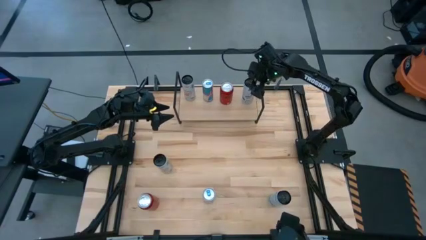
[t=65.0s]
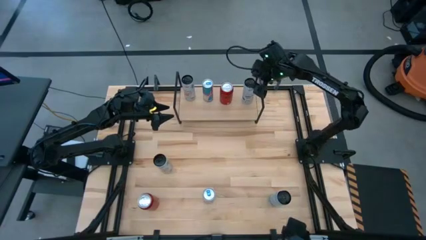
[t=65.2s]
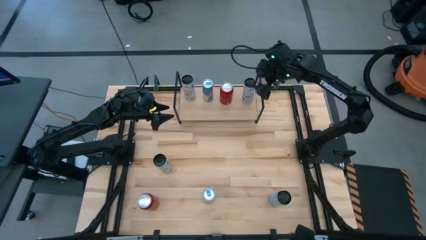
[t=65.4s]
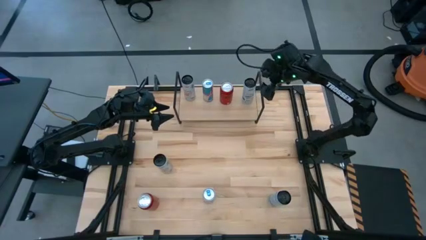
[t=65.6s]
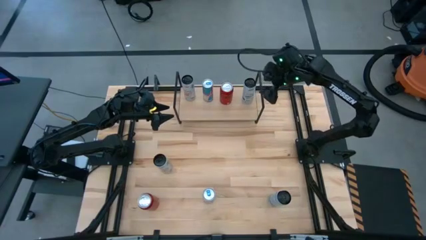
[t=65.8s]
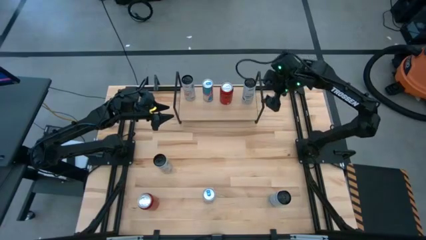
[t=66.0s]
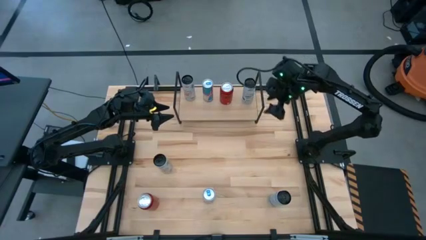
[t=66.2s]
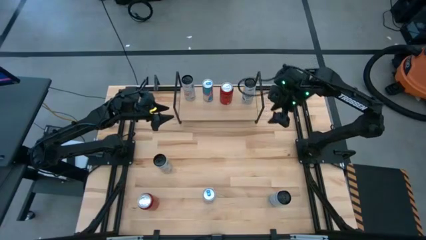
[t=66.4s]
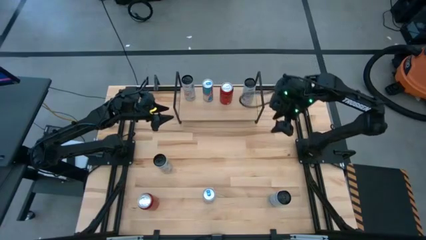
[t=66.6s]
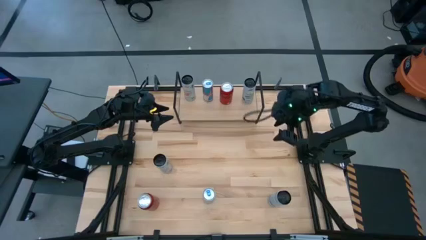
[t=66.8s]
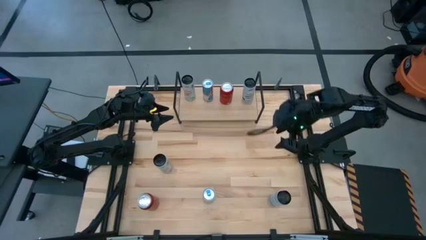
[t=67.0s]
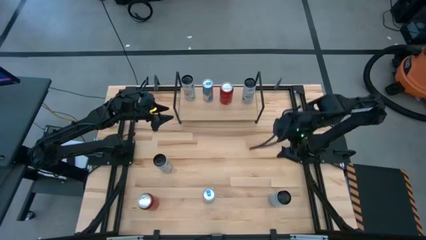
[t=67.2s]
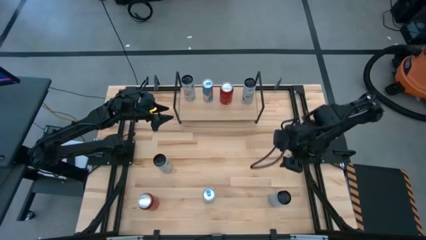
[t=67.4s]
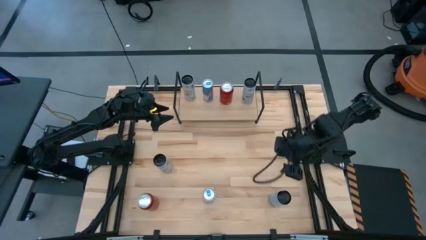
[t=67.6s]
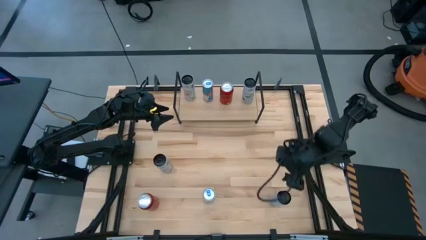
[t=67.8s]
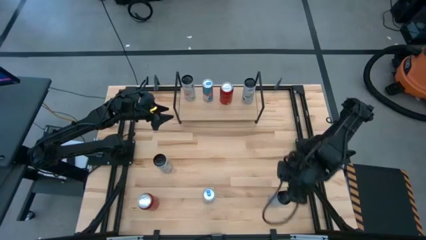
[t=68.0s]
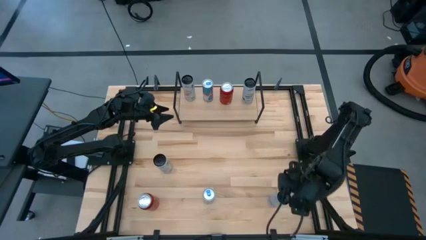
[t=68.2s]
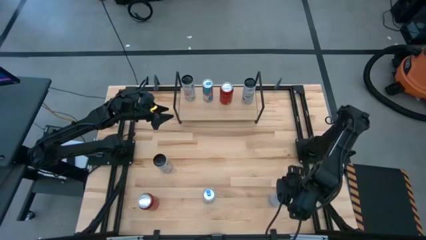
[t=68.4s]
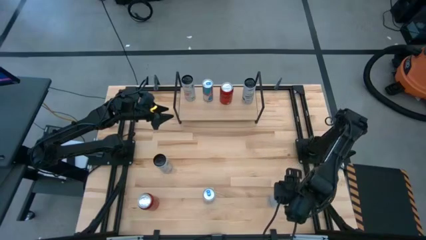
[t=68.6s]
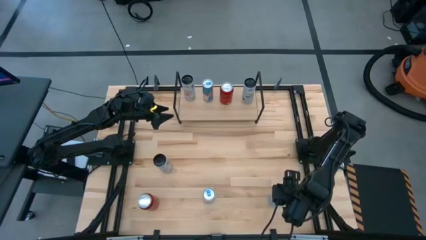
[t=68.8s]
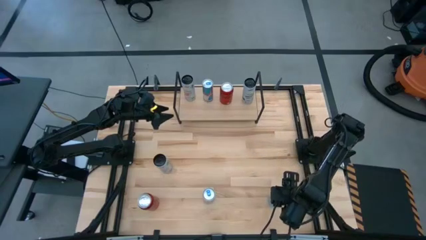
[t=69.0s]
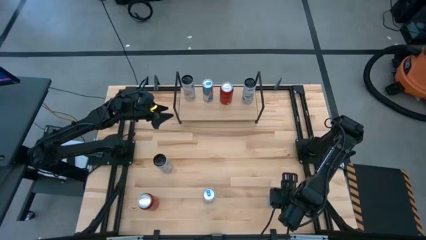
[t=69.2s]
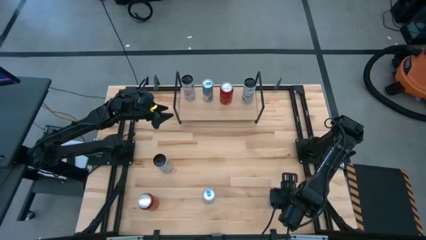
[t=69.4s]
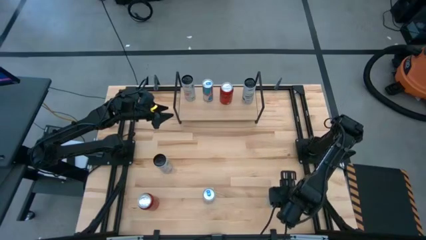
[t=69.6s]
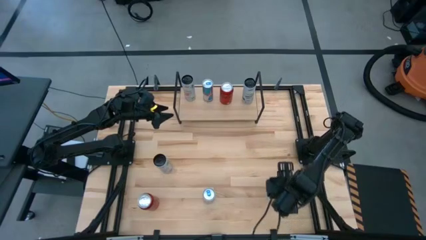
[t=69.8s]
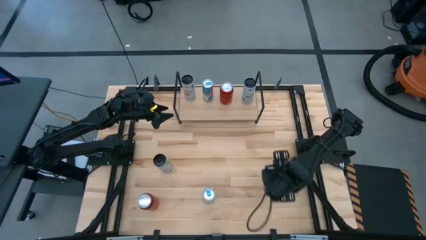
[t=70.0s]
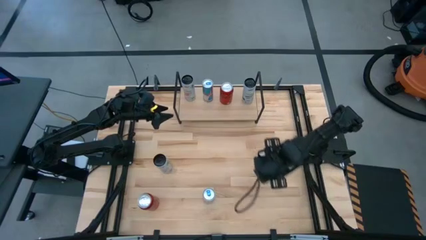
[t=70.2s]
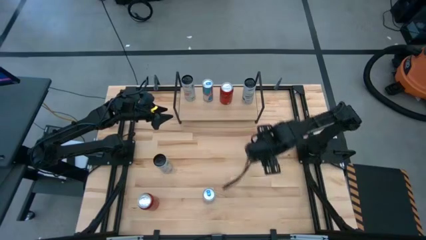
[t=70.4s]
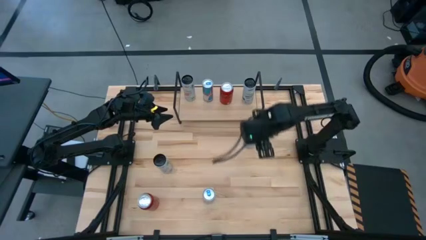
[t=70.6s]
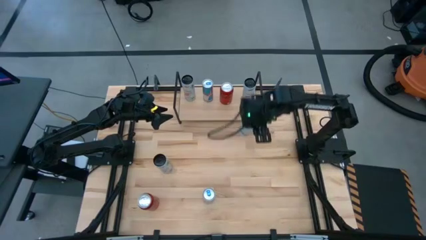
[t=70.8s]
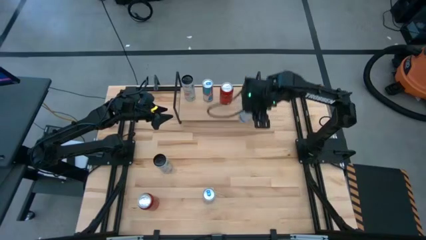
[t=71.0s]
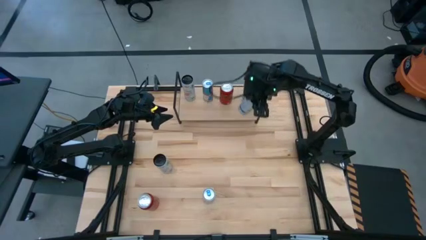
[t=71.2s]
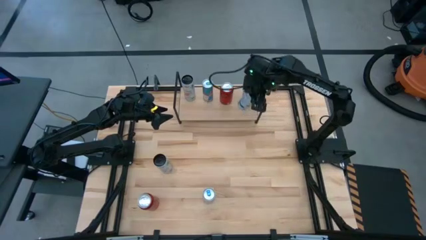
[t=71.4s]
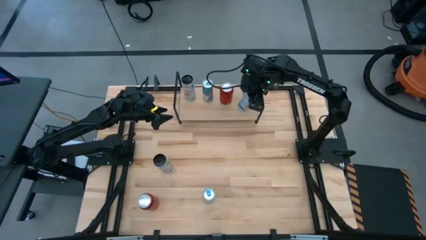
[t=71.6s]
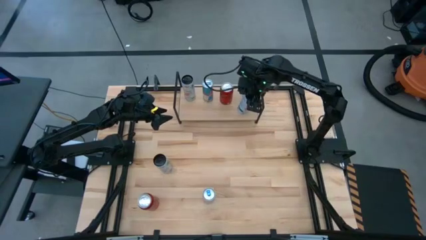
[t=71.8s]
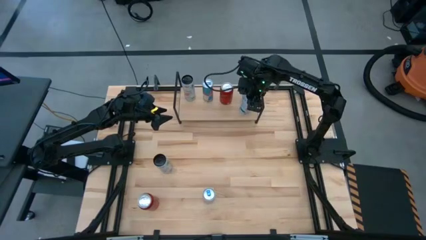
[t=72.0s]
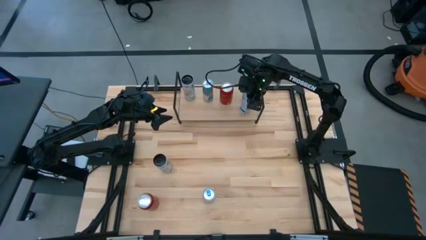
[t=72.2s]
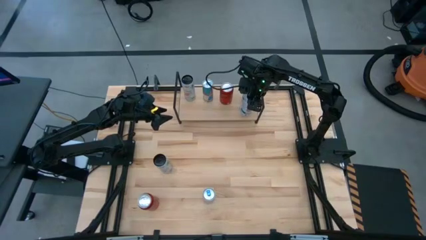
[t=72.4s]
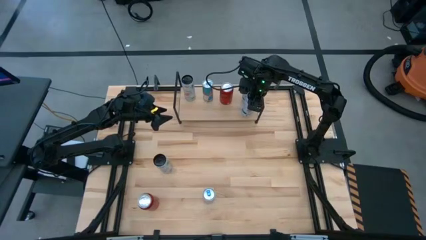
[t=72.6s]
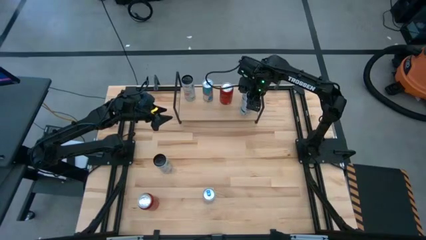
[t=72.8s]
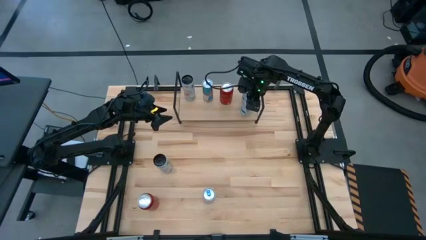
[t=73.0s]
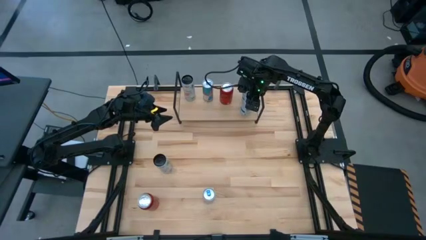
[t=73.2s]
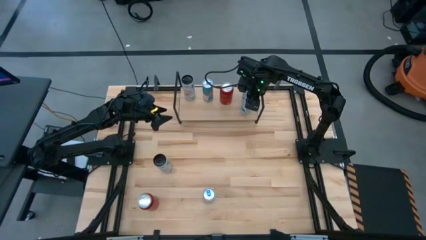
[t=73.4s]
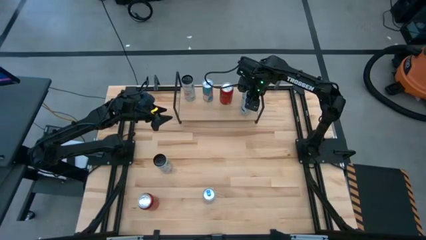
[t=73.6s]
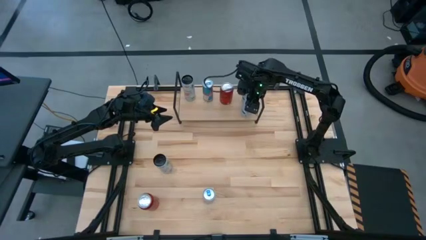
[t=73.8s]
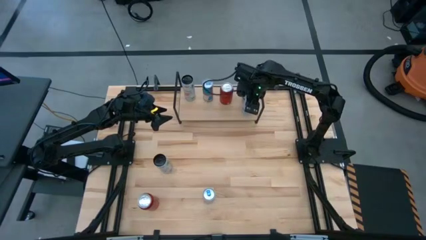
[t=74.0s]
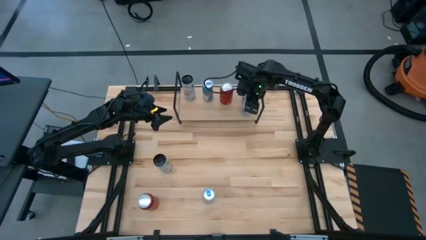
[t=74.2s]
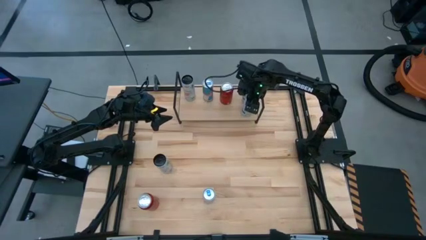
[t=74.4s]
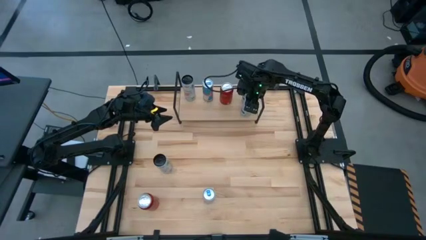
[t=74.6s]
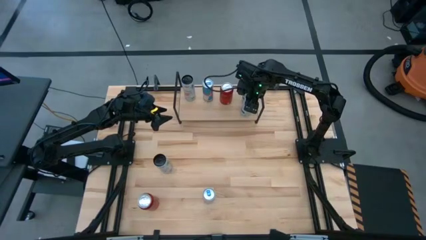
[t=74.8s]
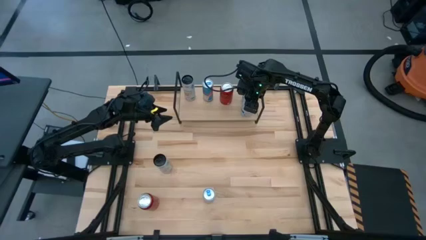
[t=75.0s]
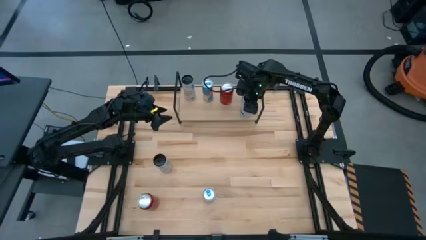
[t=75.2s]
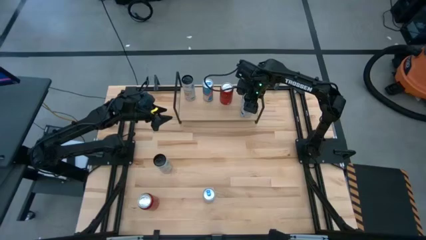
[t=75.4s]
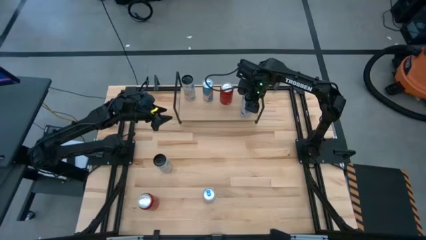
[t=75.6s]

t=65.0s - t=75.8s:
Task: Place canned beverage on shelf
Align the white and blue soda can with the white and blue soda can on the shelf
